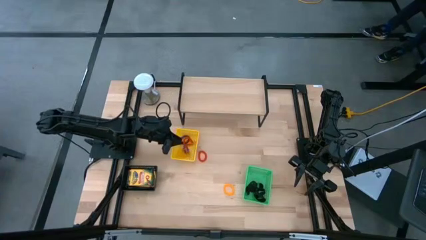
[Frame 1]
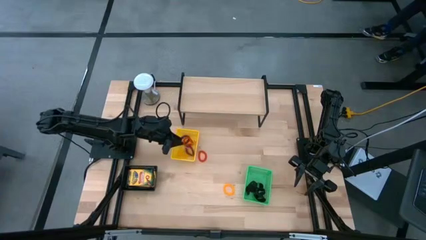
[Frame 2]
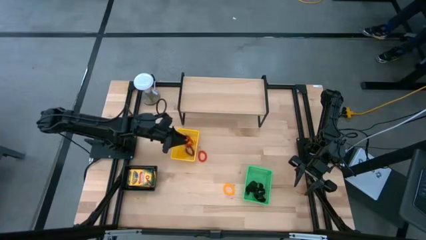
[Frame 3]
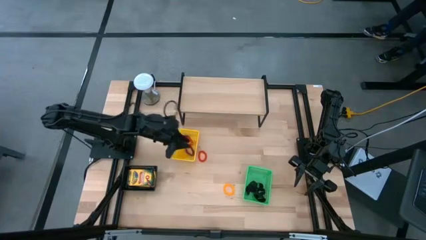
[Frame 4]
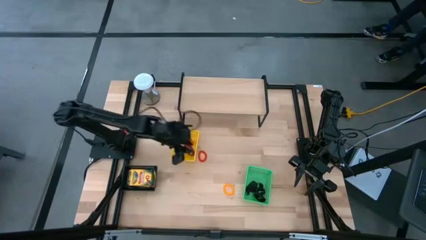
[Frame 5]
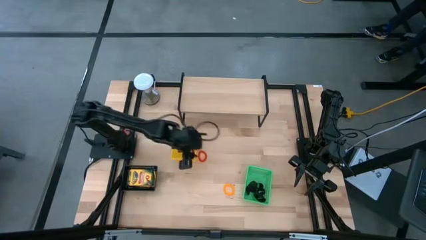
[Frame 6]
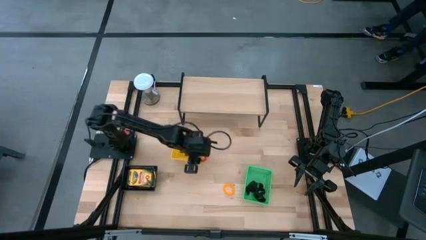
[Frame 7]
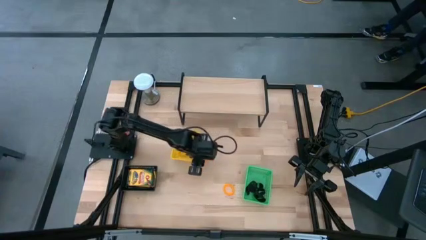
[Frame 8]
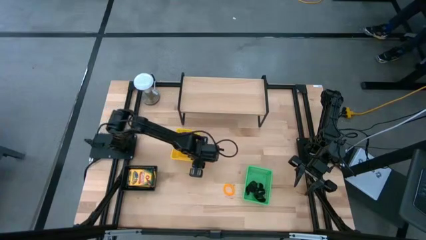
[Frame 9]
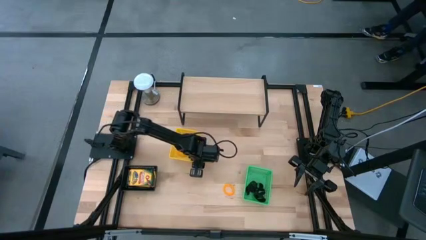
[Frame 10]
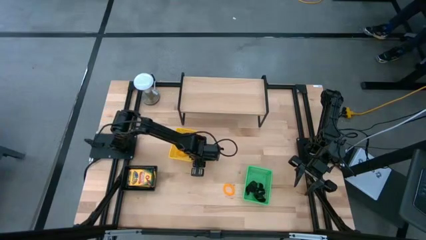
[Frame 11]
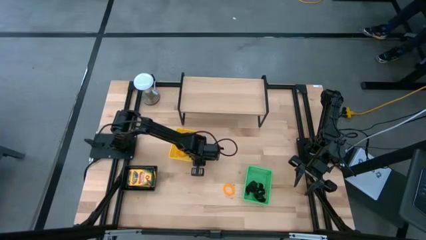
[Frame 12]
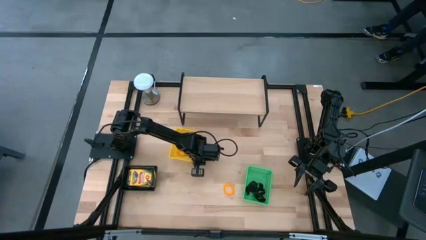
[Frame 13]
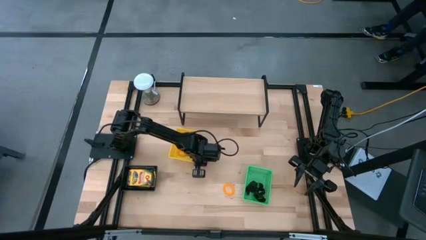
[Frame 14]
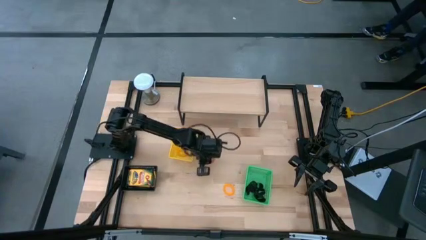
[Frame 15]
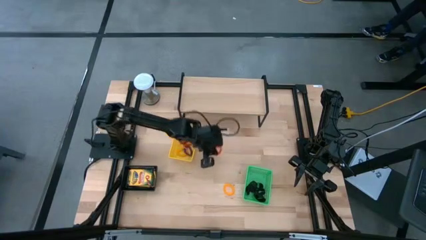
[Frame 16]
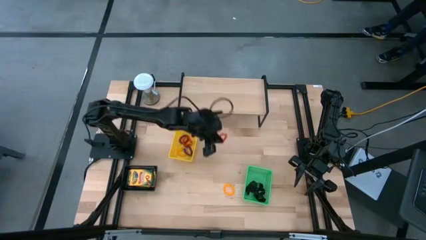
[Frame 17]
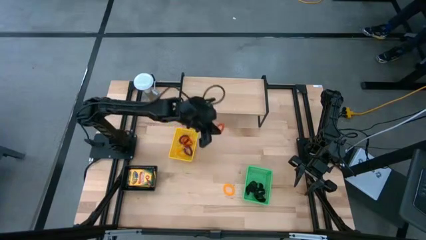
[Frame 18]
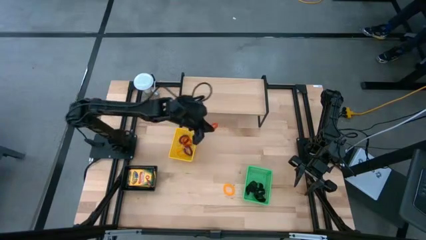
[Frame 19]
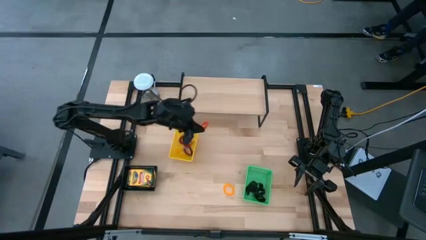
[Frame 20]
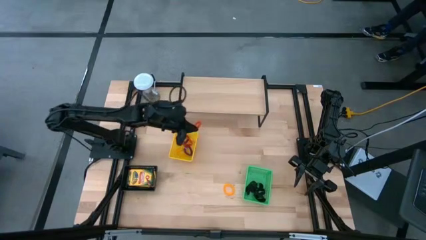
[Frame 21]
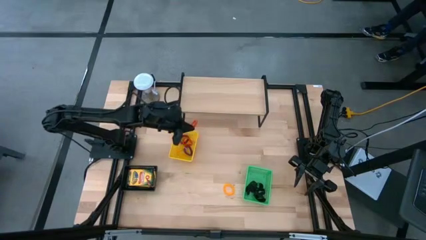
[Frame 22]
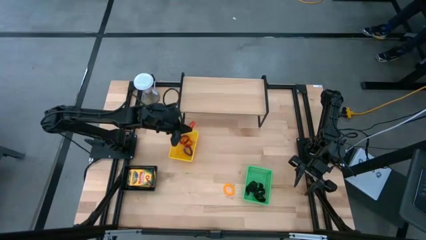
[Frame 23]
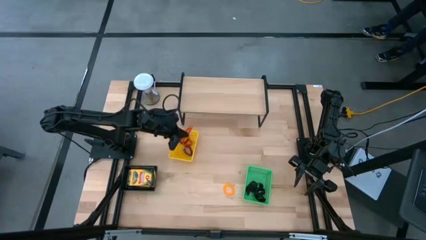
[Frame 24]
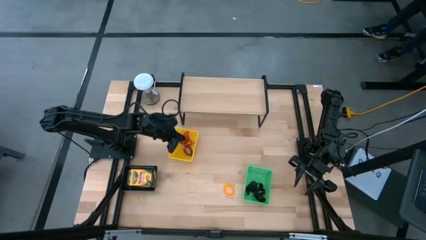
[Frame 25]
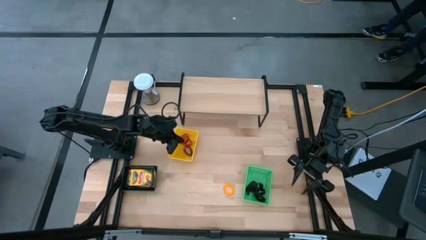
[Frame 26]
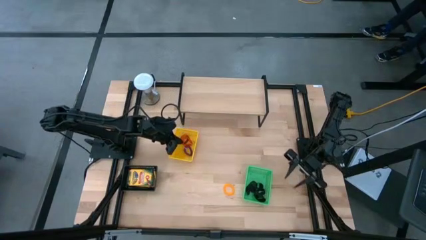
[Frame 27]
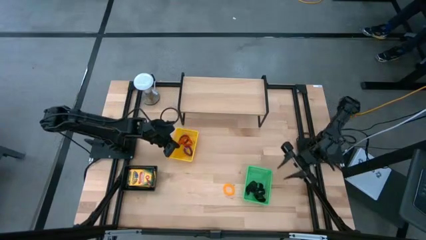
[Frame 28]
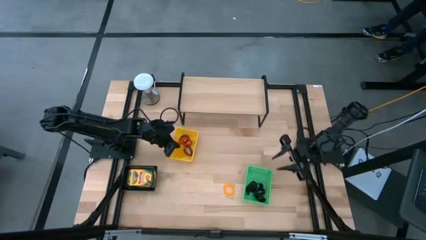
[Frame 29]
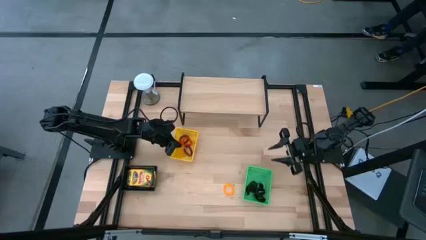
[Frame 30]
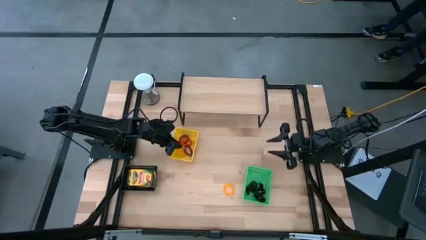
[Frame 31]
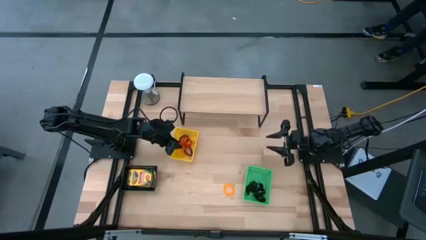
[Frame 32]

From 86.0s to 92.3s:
Task: Pick & Place Office Desk Supplies
Put the orange spring keychain into the yellow bin

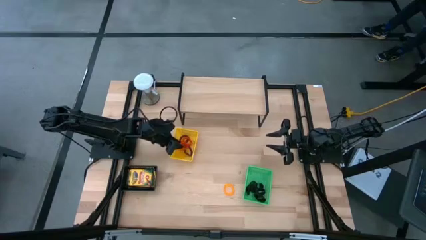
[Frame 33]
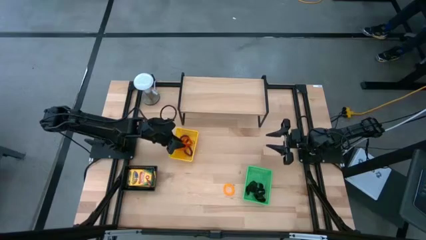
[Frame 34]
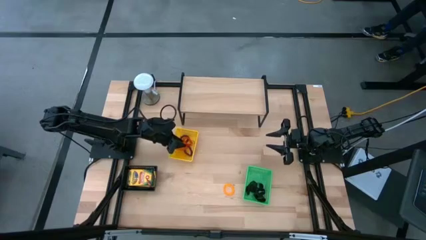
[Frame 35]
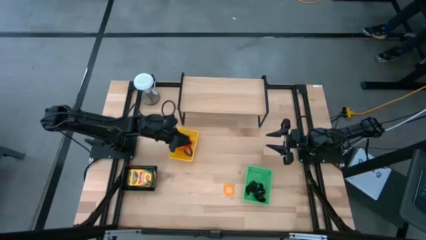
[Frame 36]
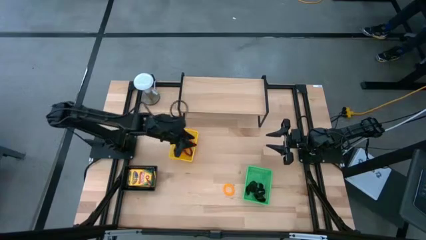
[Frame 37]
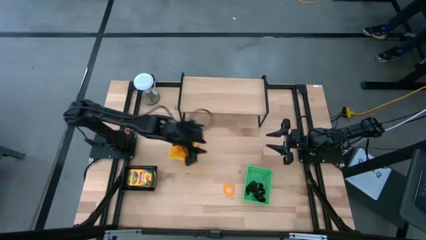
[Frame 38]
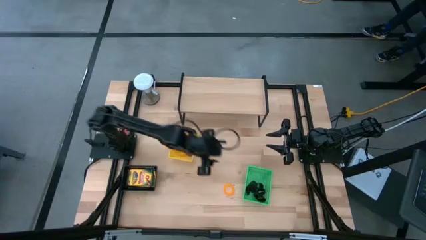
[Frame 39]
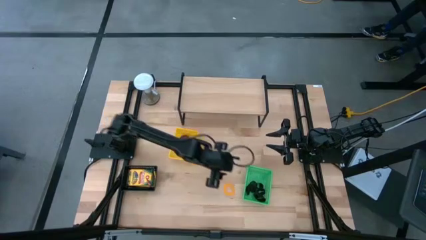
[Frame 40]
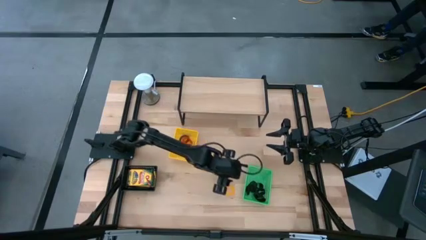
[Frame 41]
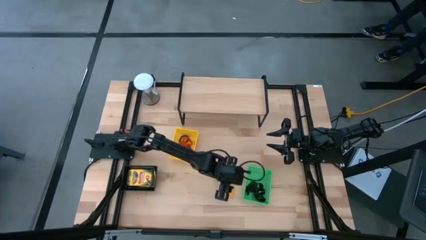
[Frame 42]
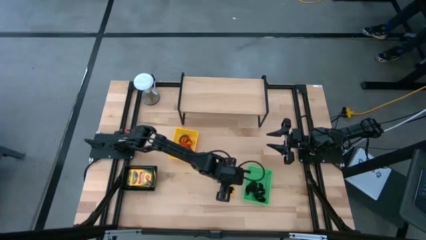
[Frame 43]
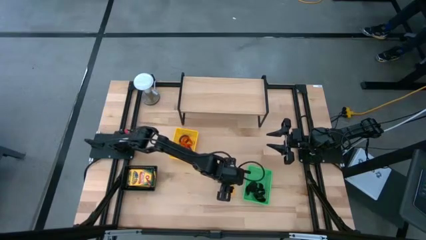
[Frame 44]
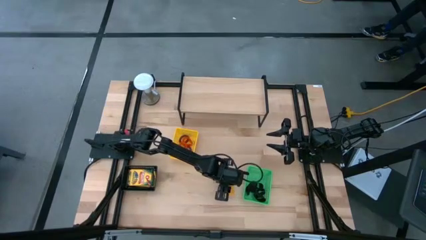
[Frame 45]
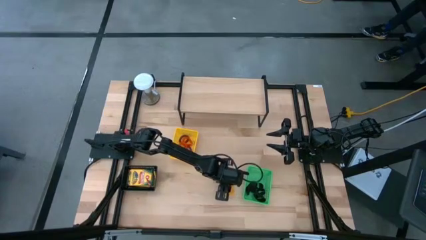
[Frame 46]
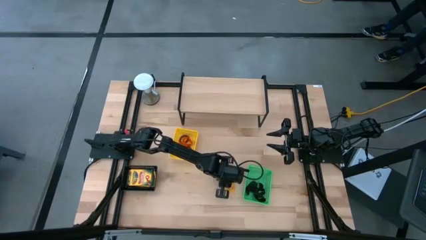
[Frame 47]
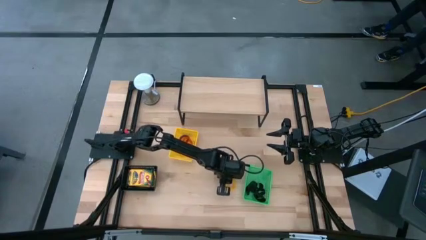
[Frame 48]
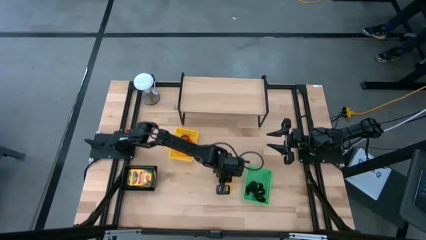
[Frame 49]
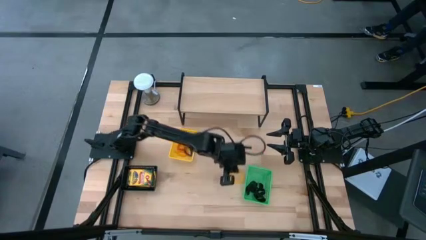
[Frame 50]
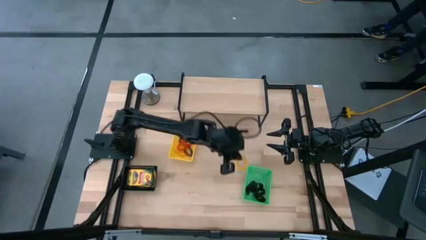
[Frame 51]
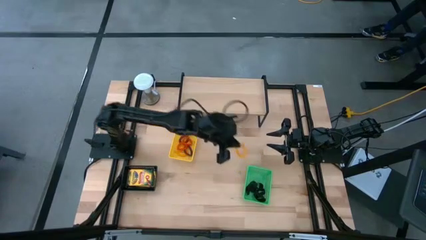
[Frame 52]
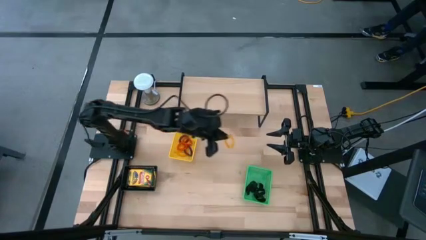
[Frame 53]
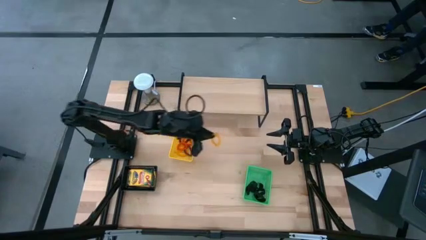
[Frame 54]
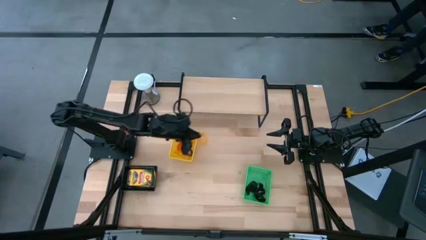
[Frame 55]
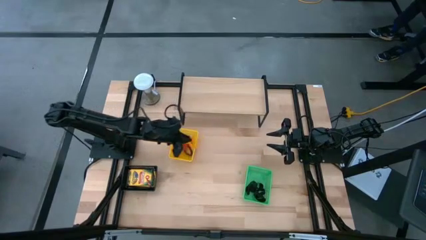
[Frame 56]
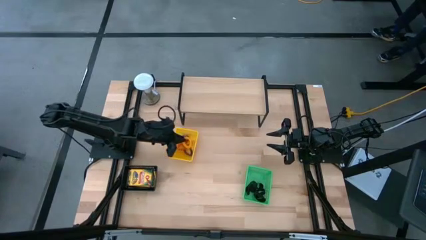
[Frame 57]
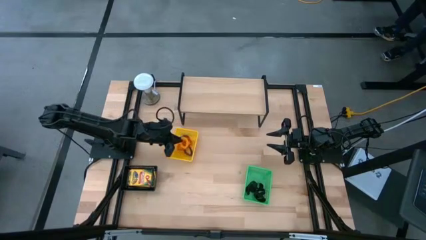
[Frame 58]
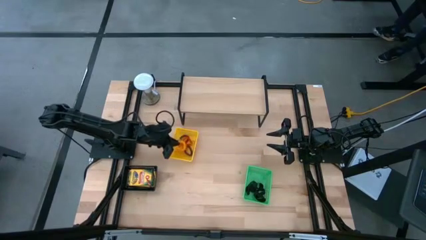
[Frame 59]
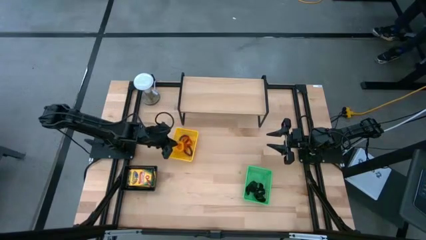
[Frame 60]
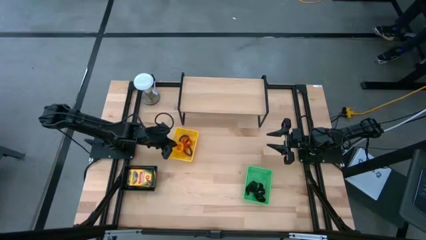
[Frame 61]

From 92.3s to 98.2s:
Put the yellow spring keychain into the yellow bin
